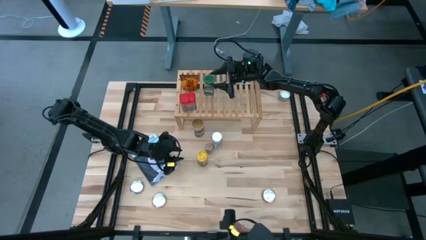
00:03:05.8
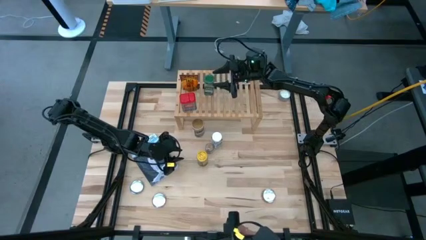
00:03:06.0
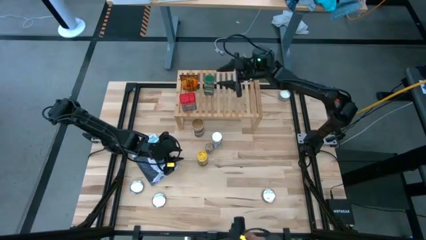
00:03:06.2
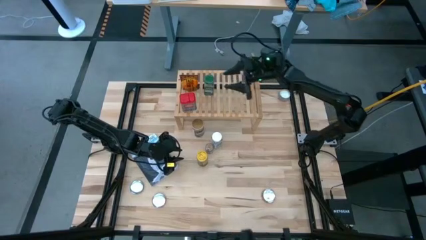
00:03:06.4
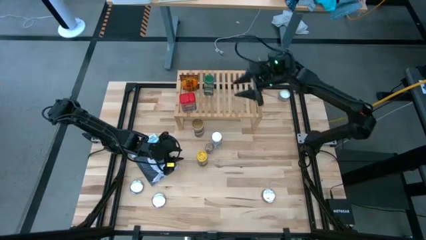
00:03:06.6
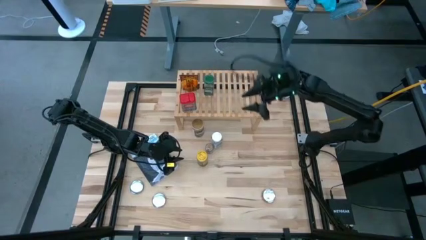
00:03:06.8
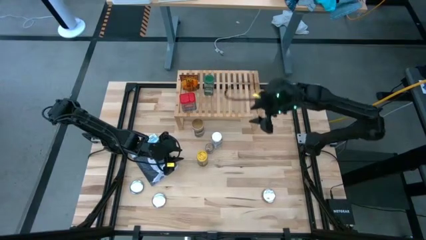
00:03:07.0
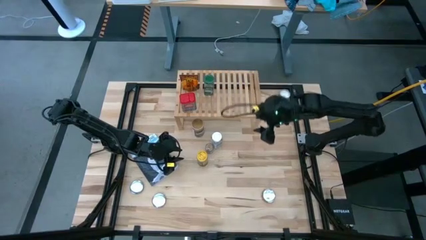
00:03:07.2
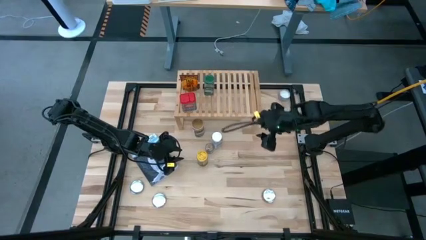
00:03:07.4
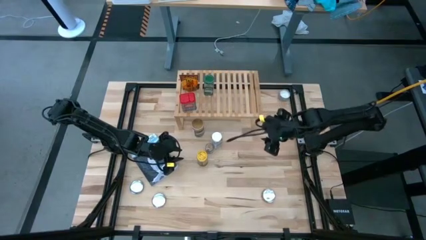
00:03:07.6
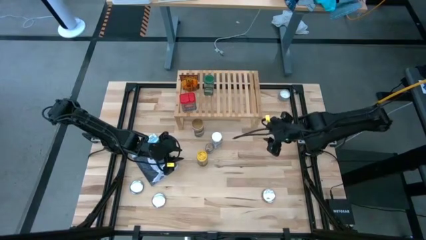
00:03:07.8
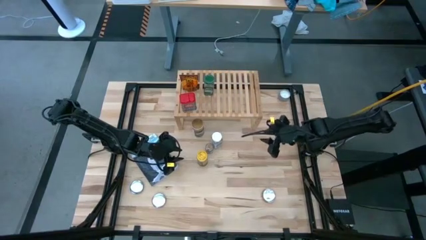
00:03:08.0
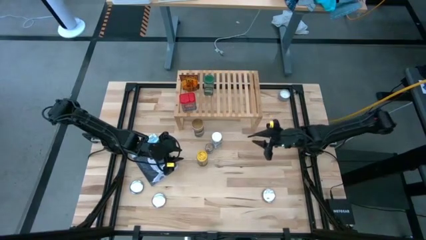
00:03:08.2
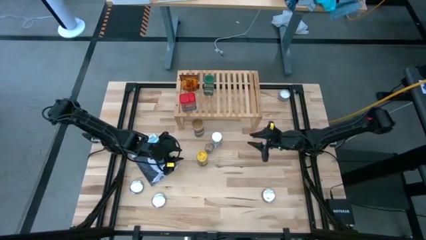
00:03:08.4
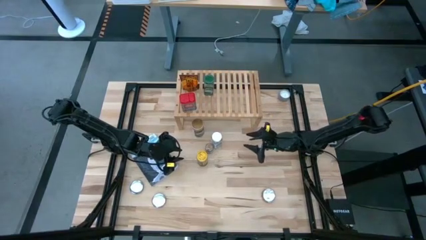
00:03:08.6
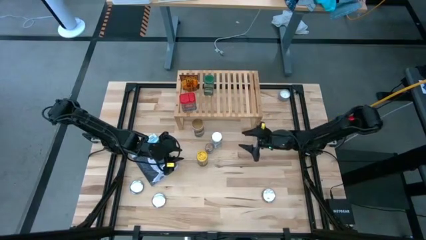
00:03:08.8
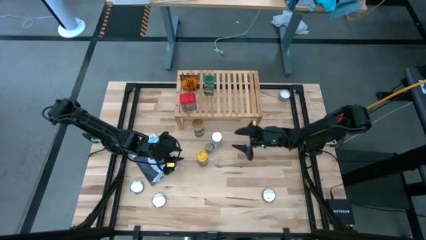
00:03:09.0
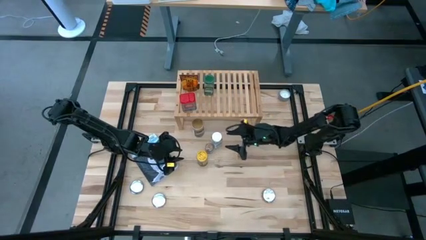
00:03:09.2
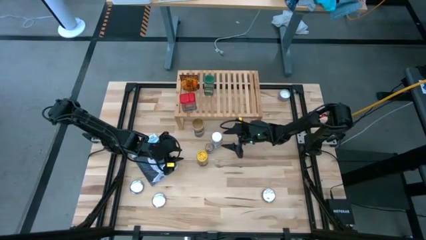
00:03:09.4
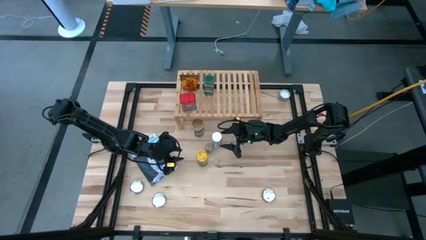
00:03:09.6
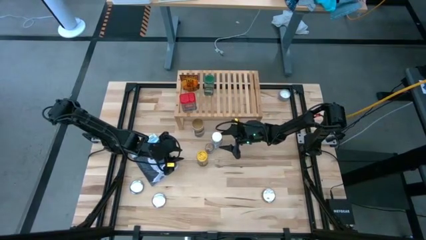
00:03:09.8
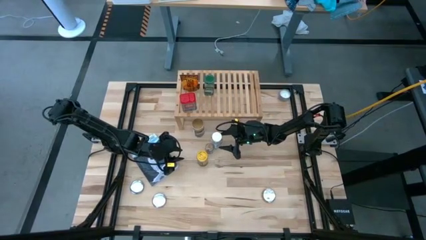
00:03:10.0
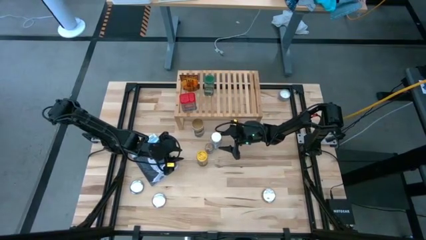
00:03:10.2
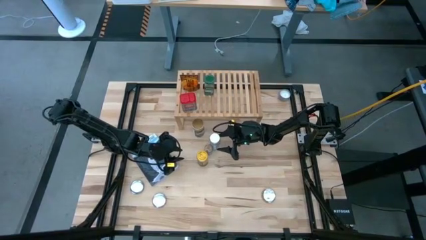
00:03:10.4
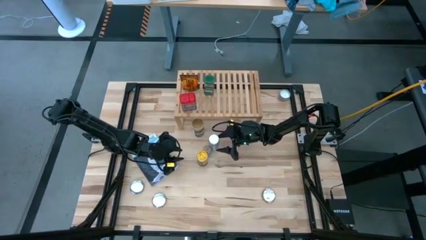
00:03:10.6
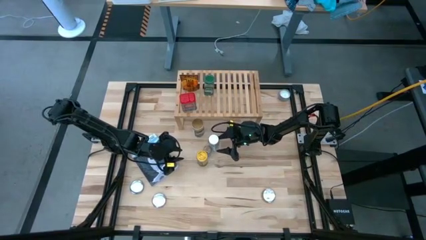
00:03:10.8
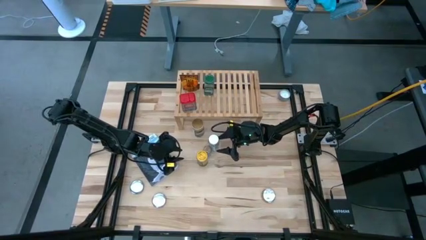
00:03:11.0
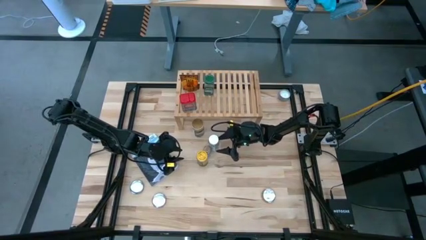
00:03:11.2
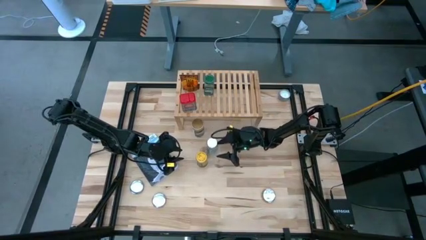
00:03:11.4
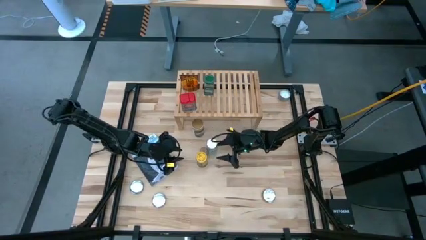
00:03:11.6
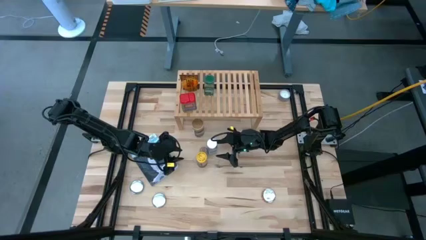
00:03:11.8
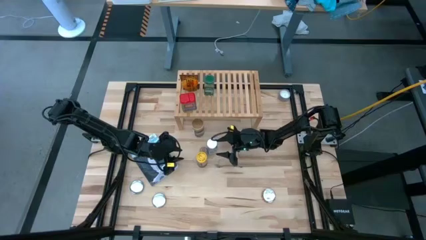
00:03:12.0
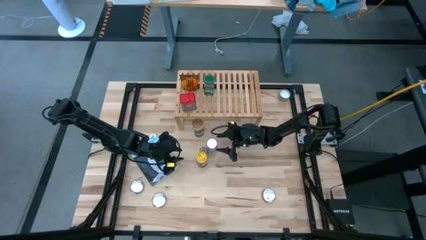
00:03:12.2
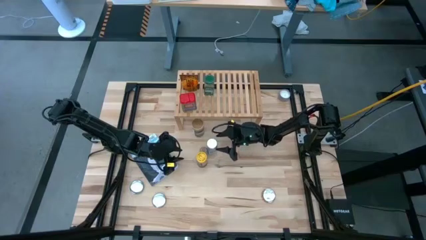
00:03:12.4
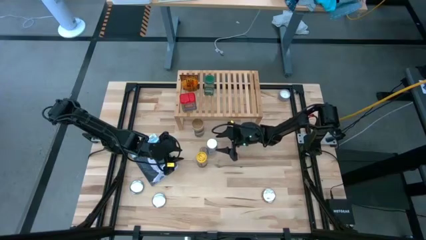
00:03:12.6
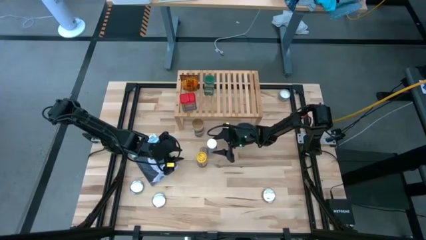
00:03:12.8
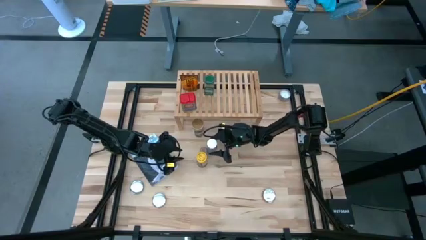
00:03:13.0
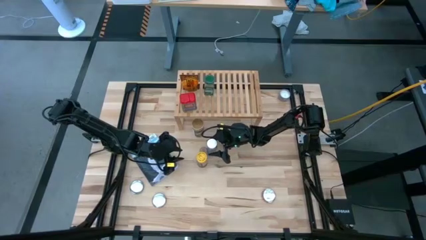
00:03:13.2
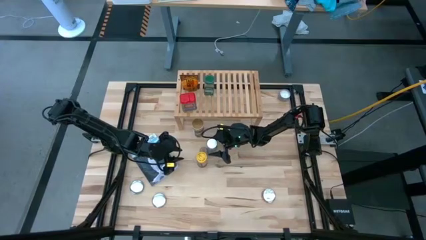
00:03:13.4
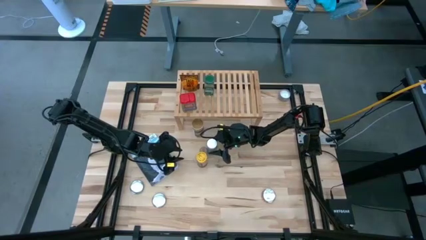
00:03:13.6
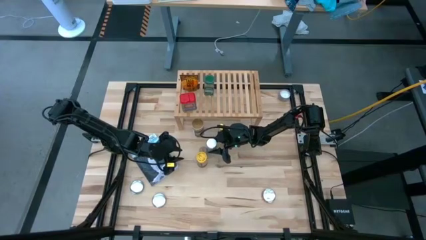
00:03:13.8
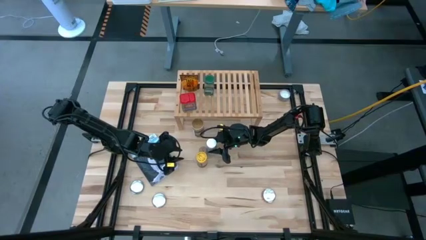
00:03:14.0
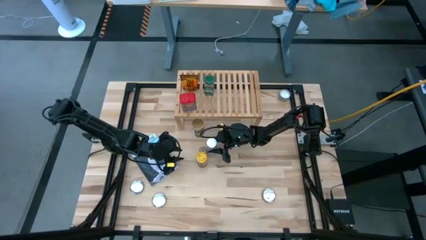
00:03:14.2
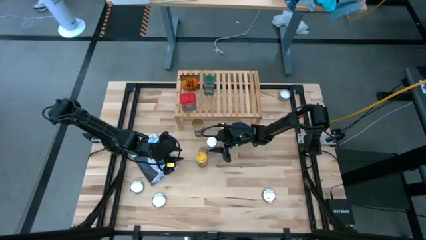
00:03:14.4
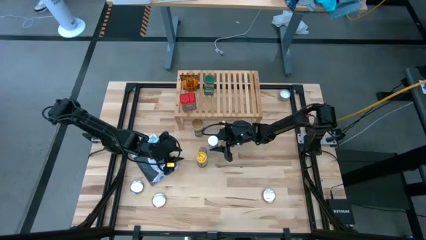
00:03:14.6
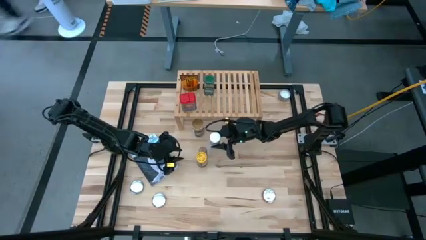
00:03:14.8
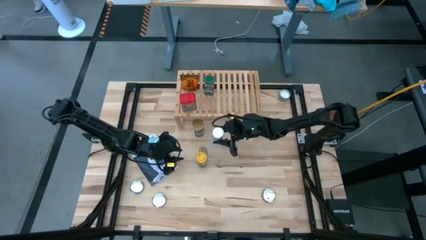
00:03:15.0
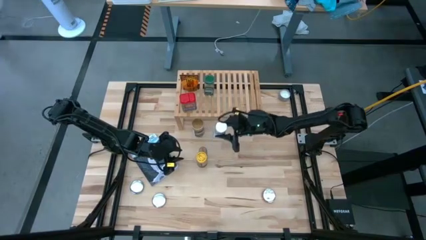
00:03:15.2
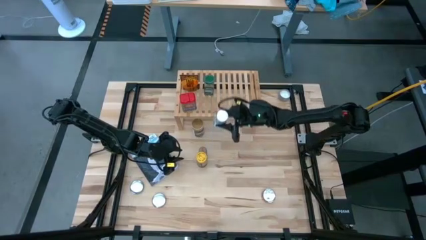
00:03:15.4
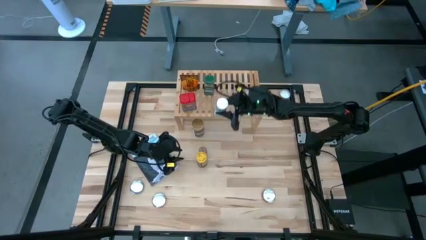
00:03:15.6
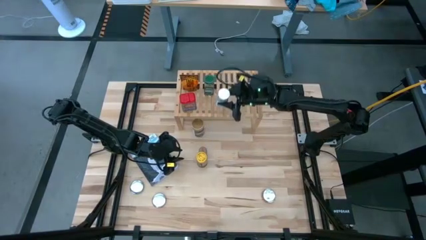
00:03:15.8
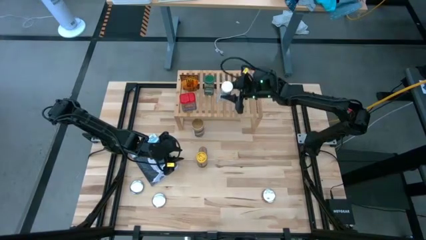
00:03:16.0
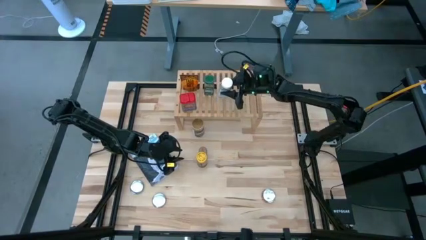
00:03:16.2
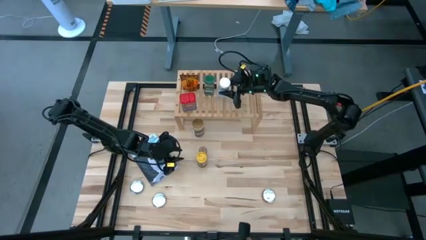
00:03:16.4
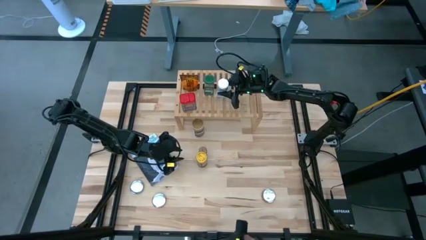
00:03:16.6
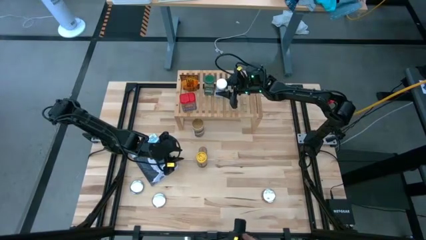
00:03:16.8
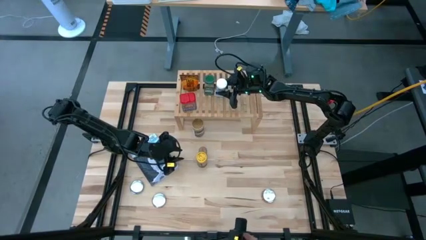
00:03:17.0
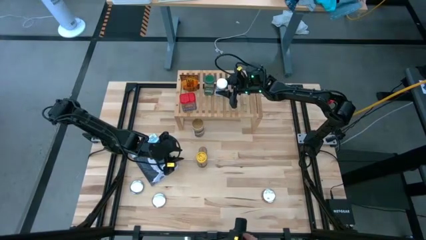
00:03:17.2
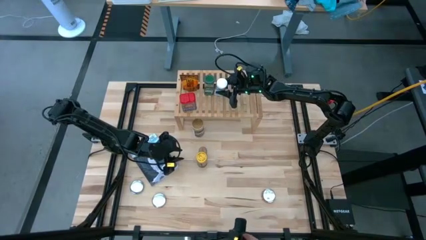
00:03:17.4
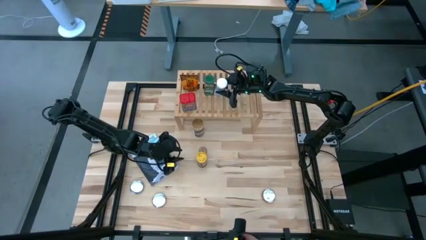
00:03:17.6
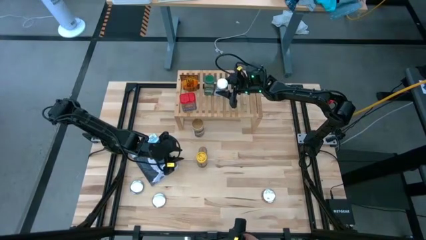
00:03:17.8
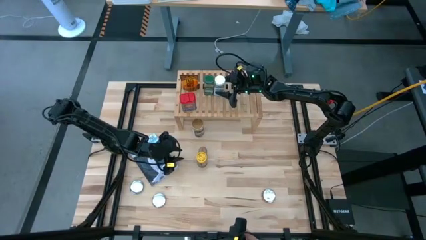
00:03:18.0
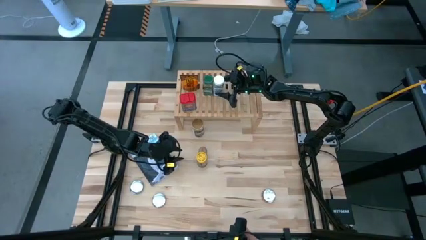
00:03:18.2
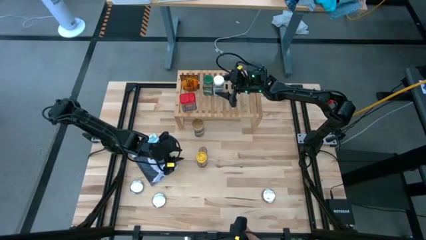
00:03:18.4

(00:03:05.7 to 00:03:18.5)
Task: Shelf spices
Put the white seasoning bottle on the shelf

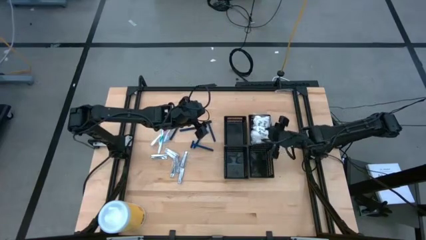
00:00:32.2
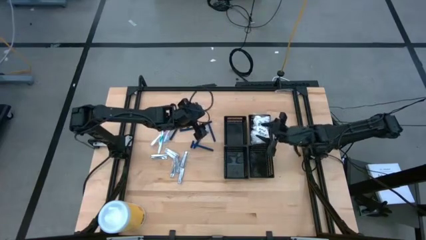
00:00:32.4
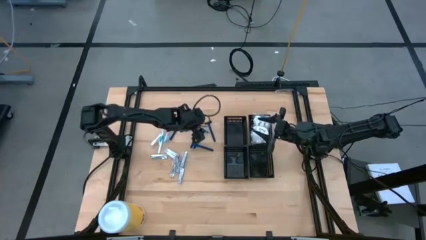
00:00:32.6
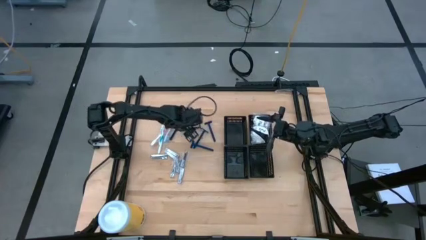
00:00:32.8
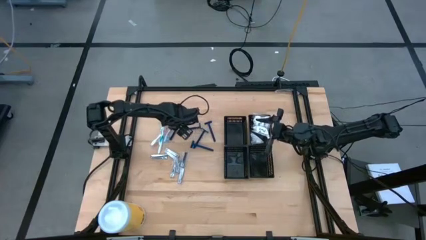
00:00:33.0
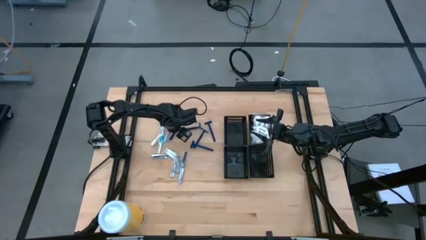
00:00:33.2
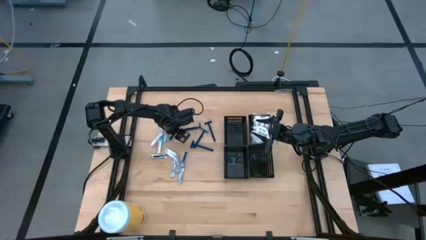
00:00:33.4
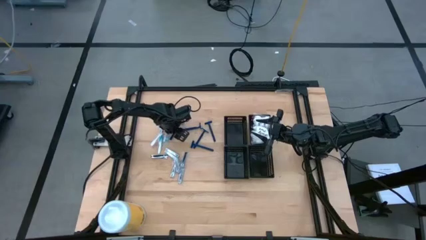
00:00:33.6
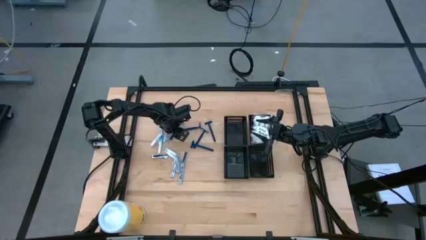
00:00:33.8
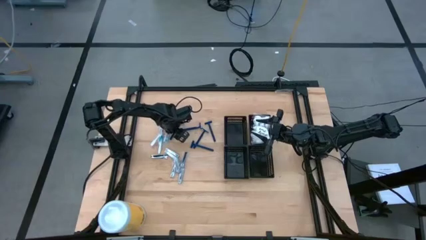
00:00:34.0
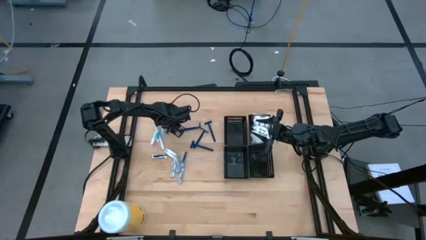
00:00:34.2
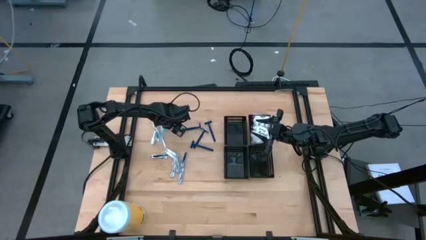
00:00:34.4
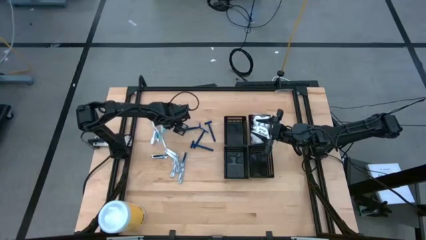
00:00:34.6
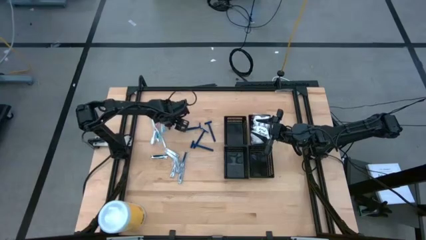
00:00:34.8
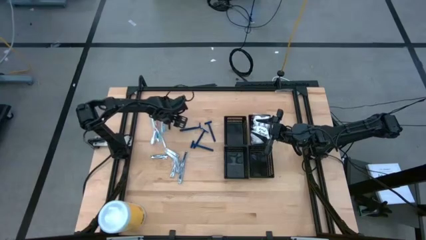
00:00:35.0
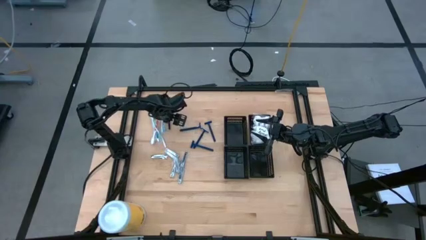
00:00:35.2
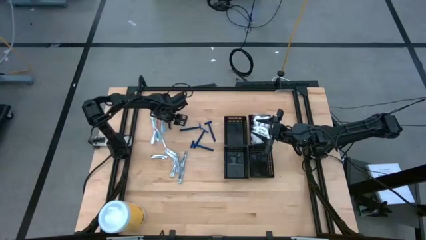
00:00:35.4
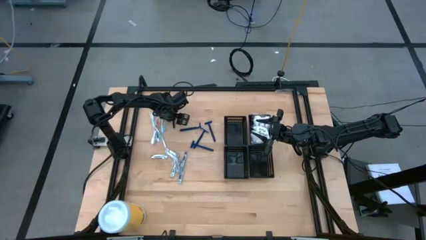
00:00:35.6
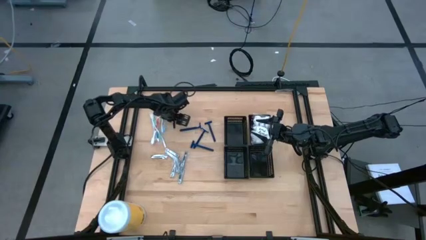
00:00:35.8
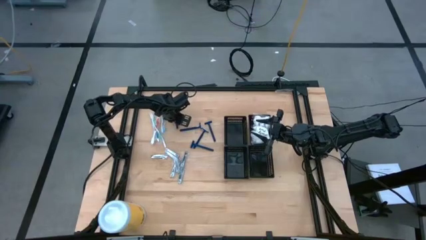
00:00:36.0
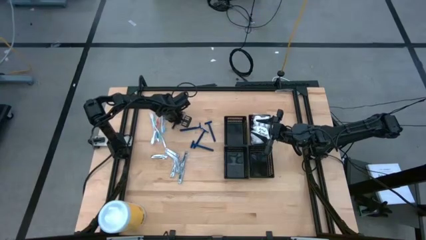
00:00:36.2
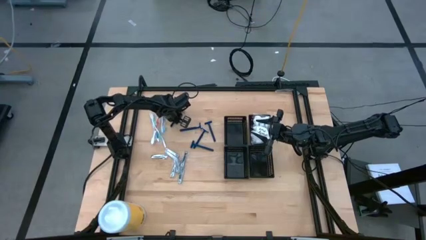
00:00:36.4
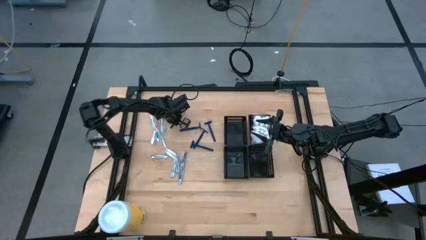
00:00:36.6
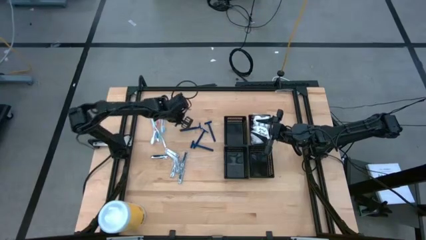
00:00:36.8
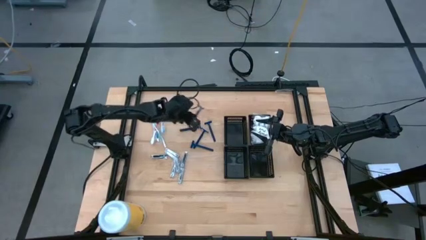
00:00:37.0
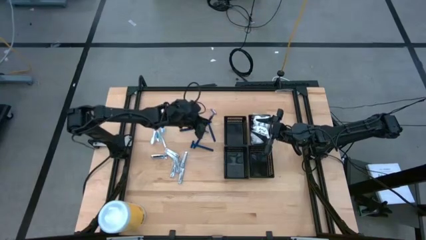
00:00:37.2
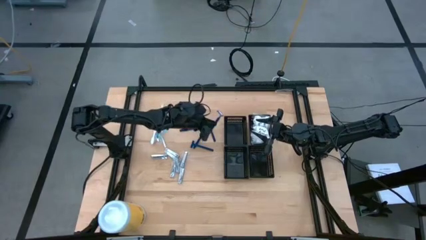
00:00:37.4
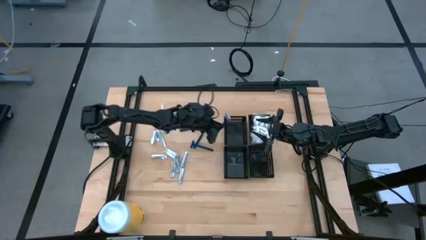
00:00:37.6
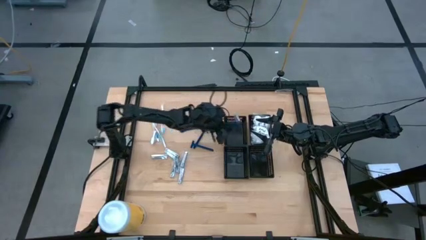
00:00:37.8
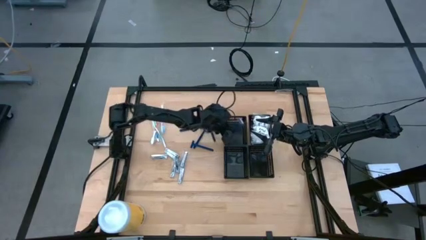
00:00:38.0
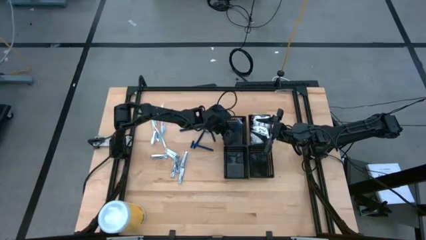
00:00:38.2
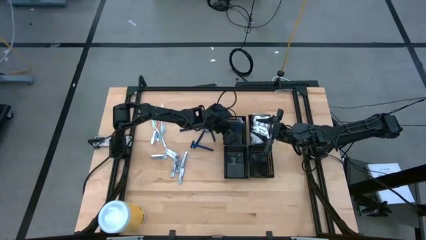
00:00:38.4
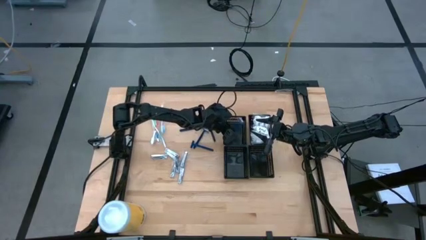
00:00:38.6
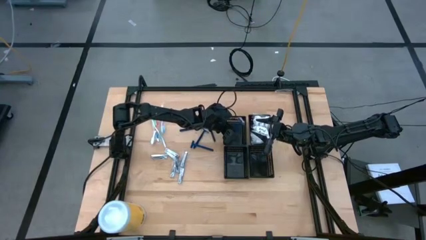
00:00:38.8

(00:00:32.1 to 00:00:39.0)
Task: Pick & Place Travel size toiletries
Put the razor into the top left black basket
